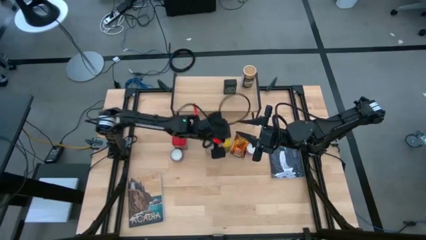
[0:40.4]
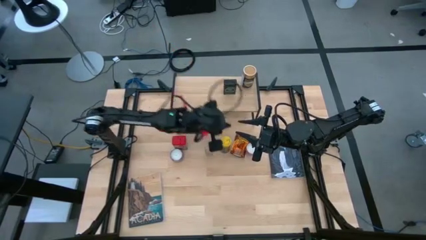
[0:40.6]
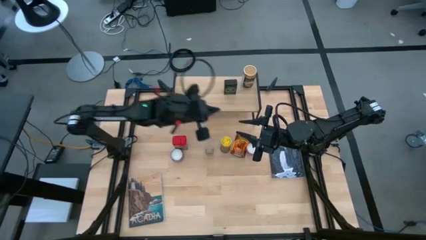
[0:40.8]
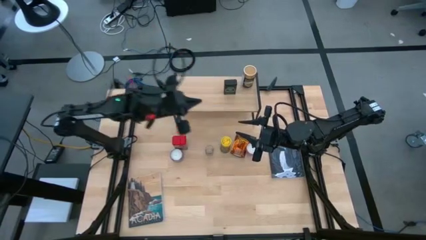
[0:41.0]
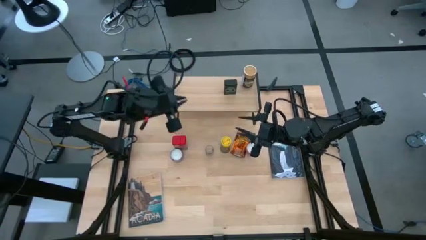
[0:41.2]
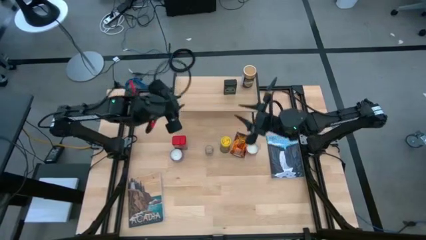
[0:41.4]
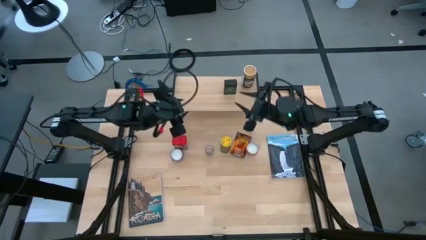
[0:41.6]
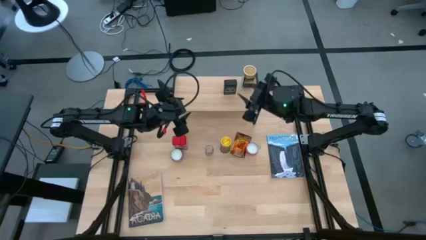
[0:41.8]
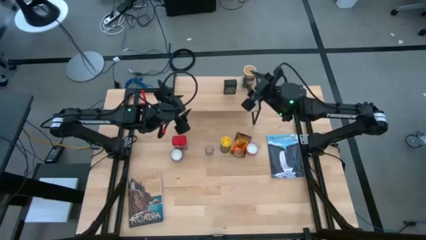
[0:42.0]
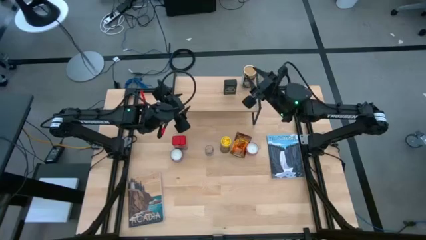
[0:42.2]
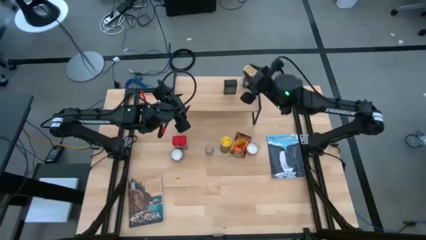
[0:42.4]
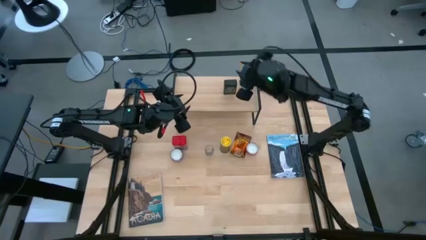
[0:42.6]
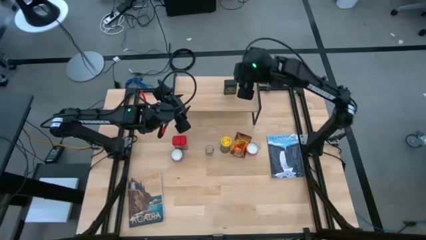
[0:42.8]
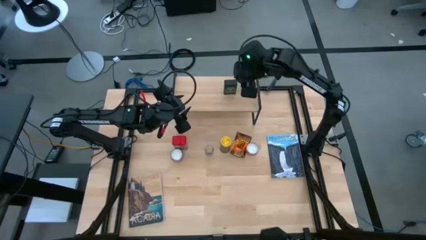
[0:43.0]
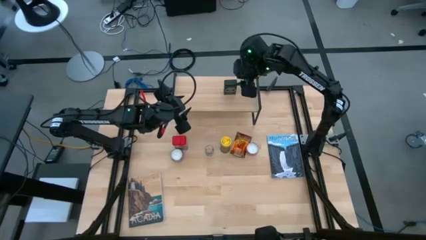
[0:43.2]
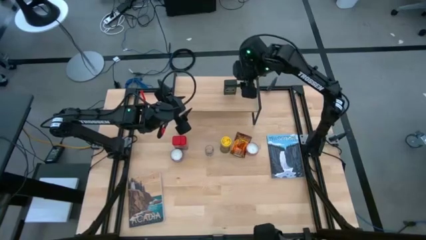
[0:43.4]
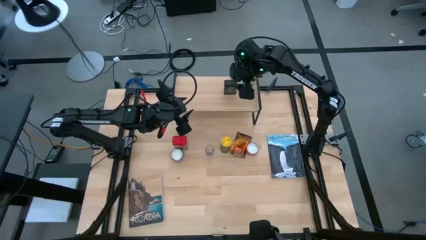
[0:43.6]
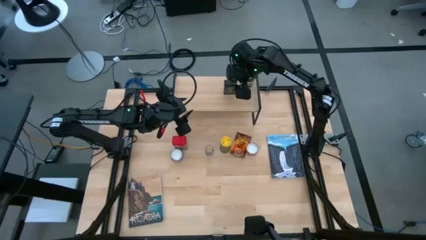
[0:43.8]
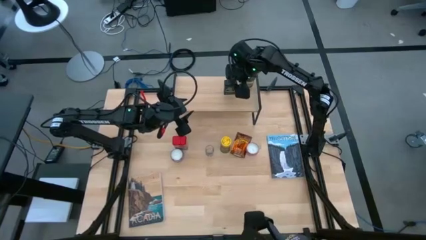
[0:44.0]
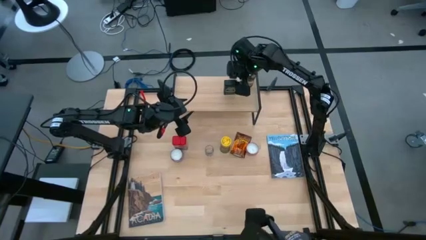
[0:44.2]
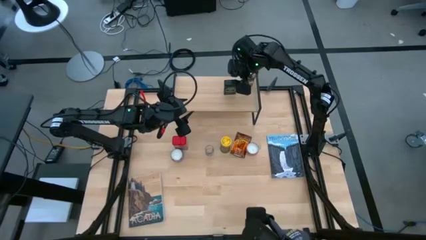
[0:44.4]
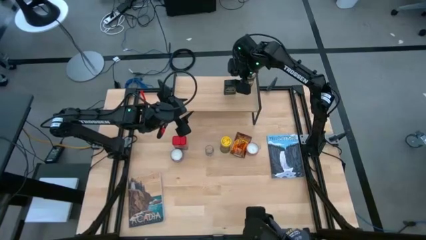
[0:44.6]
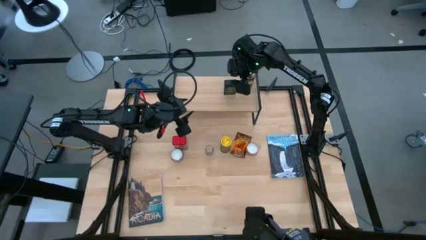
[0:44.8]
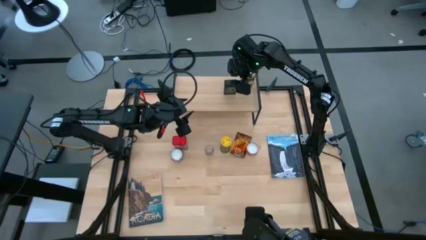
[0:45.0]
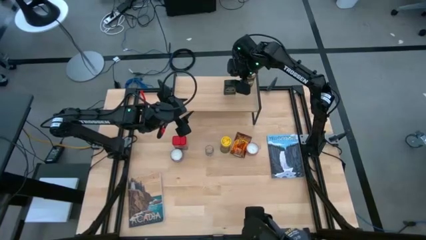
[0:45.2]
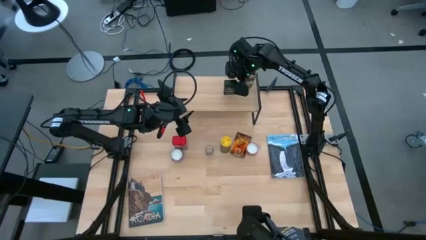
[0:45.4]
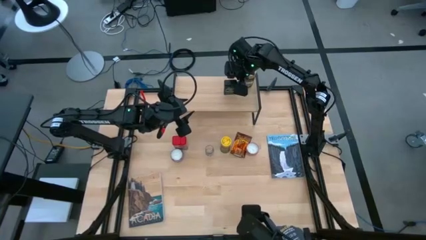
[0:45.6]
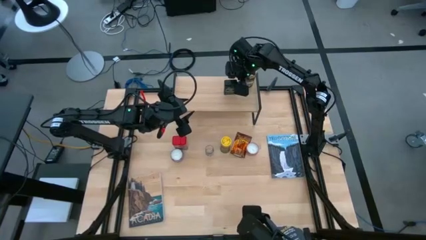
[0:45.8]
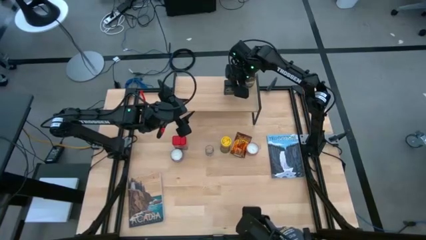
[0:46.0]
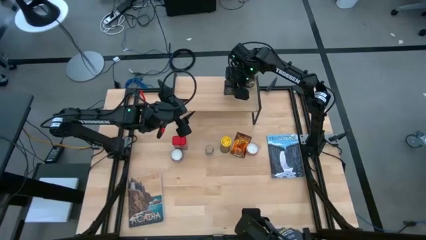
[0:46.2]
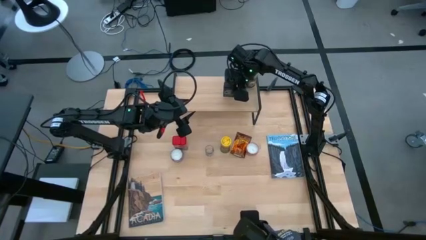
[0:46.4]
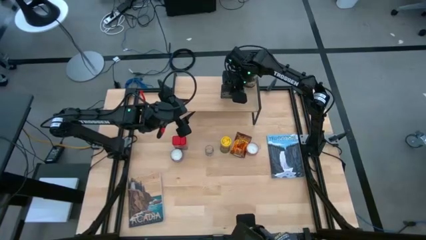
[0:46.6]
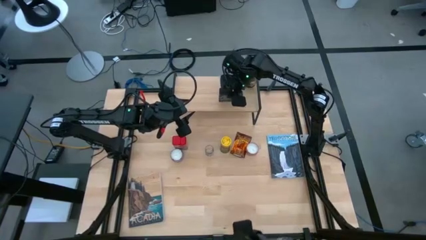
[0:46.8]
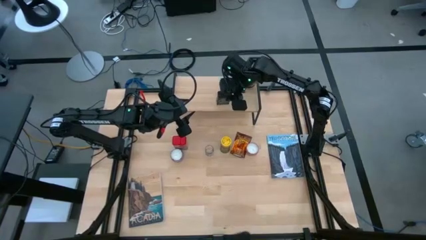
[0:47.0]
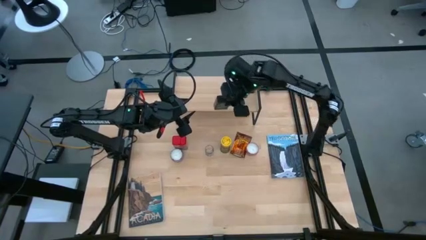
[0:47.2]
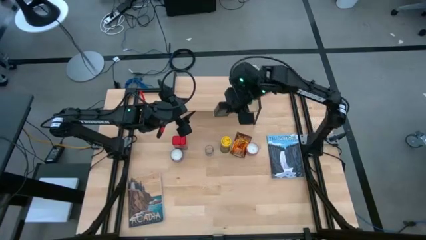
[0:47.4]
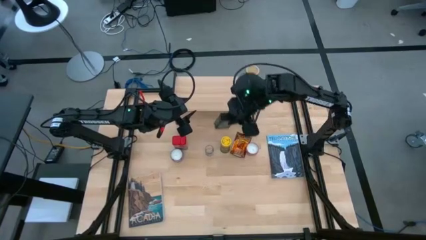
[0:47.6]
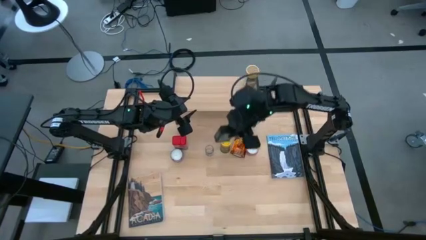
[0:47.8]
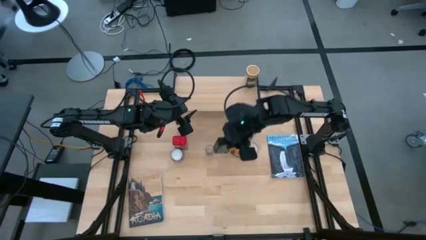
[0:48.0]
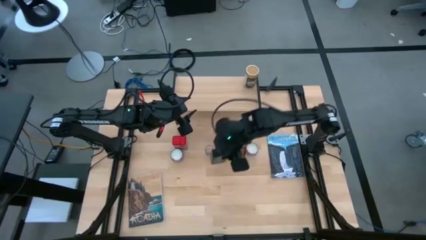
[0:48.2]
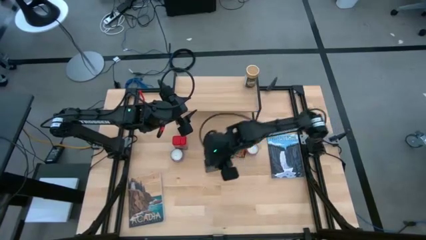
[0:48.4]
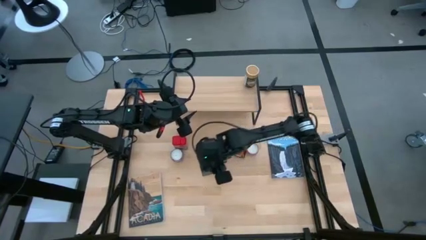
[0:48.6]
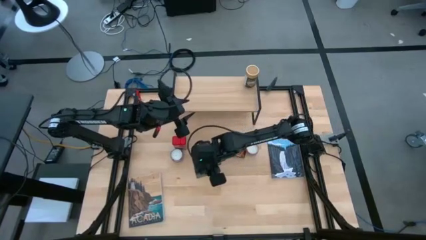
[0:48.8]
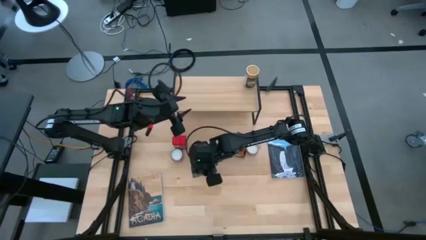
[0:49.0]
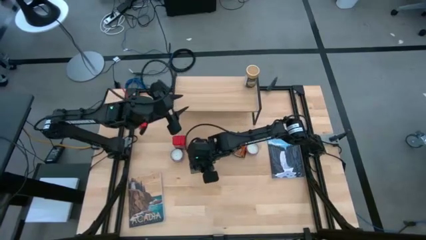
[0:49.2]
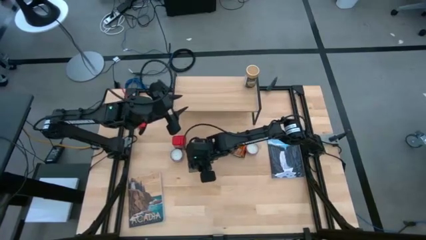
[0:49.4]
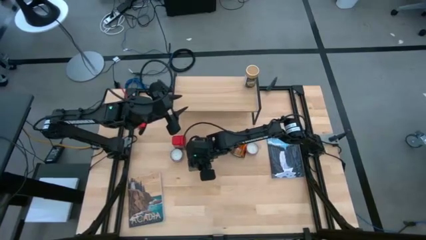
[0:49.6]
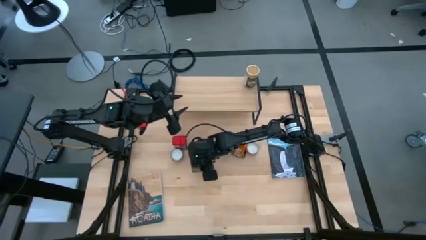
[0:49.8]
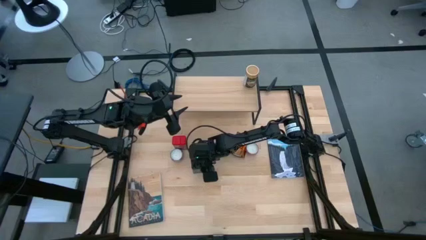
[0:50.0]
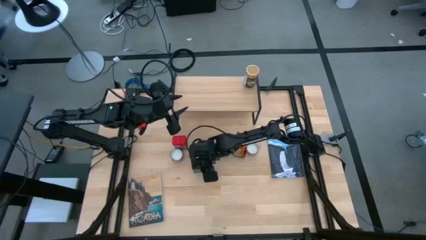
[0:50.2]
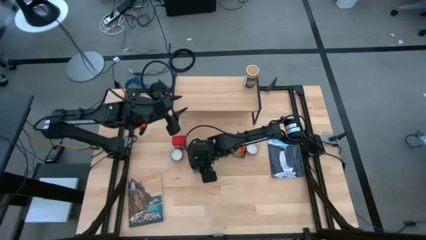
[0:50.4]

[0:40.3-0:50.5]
Task: Shelf spices
Remove the black seasoning can from the shelf

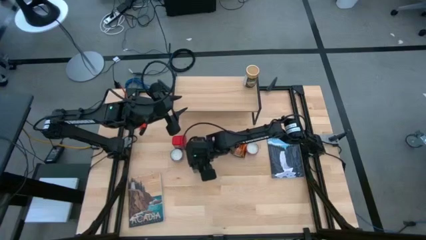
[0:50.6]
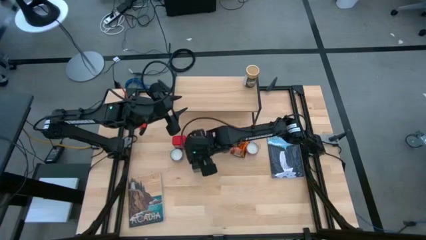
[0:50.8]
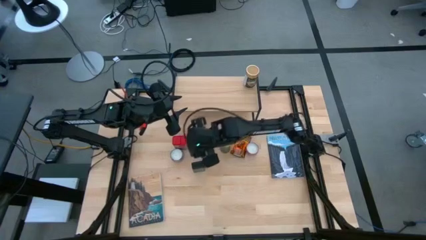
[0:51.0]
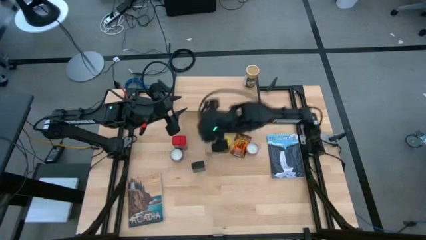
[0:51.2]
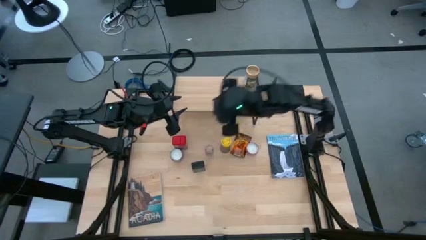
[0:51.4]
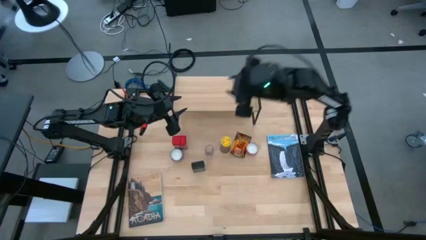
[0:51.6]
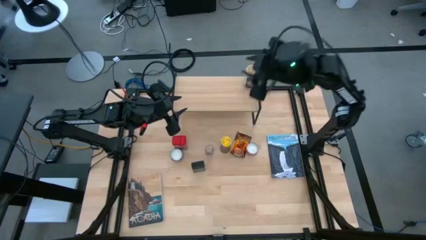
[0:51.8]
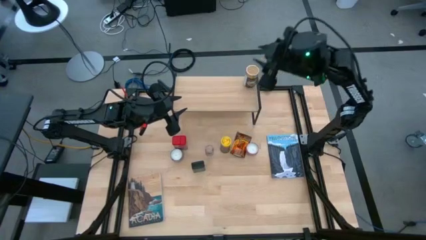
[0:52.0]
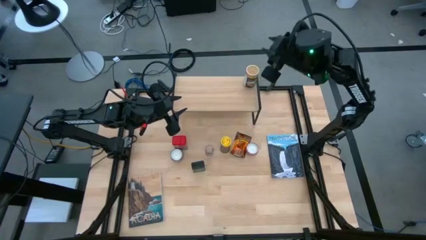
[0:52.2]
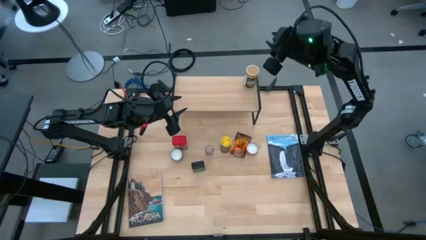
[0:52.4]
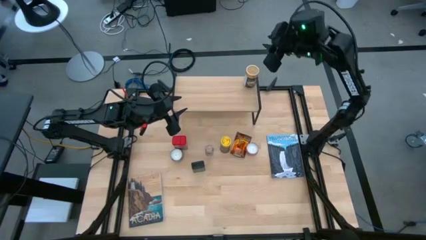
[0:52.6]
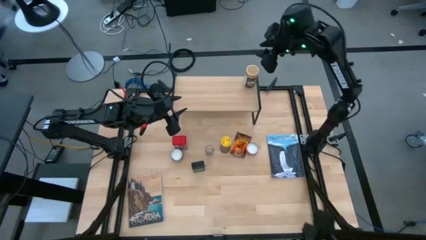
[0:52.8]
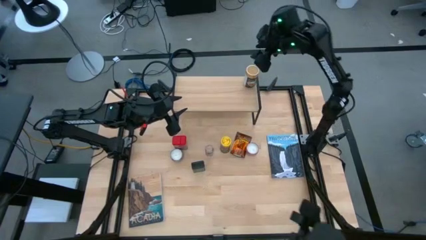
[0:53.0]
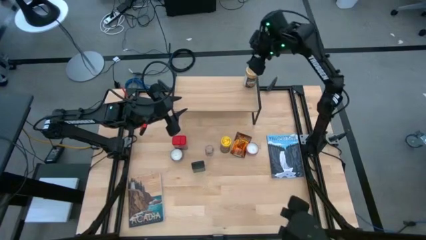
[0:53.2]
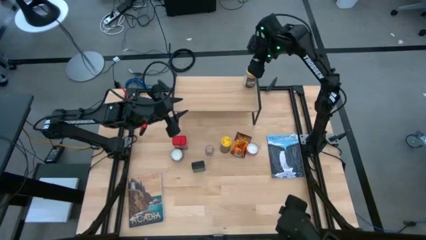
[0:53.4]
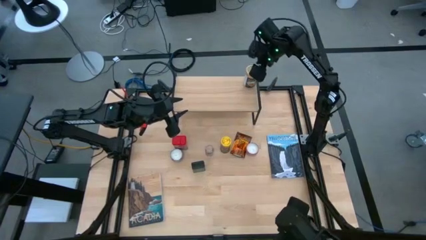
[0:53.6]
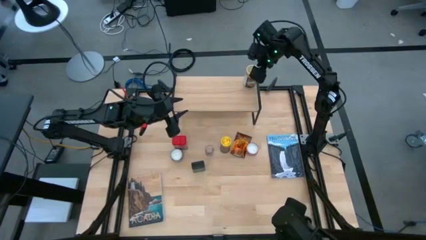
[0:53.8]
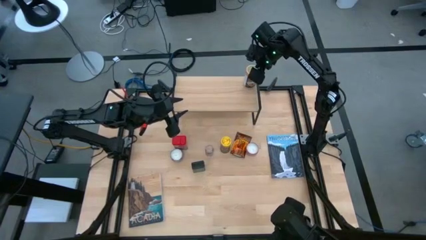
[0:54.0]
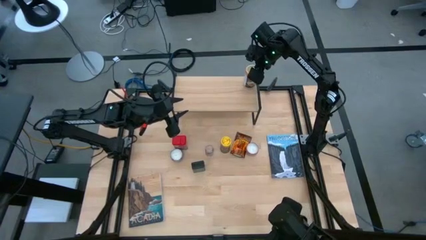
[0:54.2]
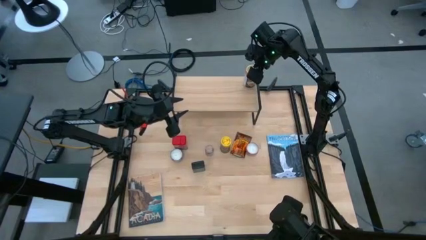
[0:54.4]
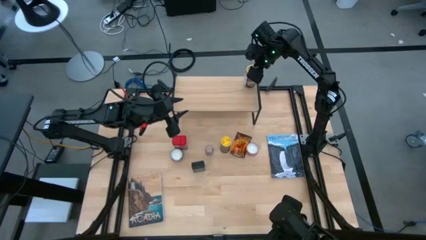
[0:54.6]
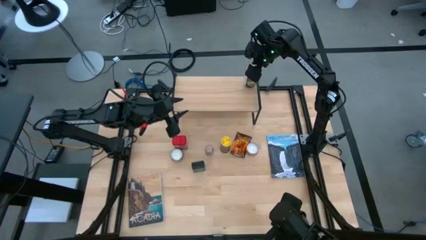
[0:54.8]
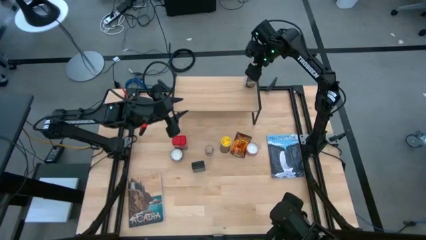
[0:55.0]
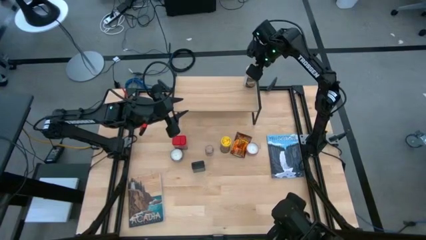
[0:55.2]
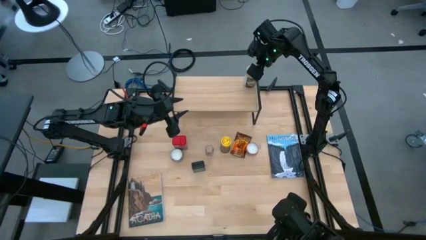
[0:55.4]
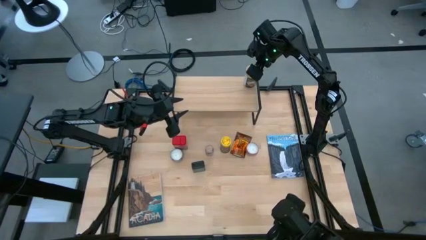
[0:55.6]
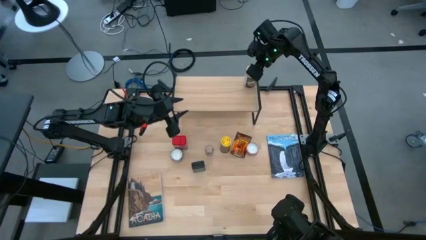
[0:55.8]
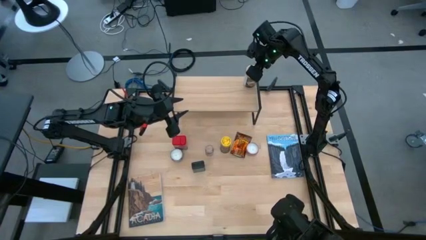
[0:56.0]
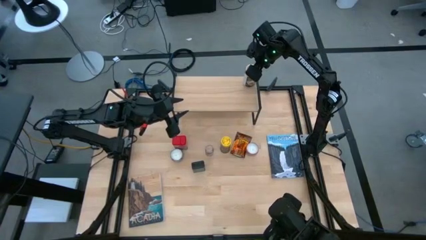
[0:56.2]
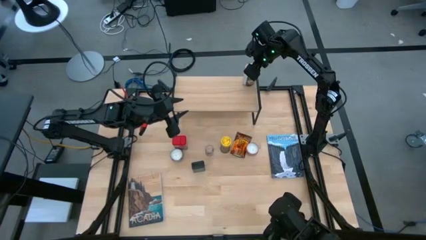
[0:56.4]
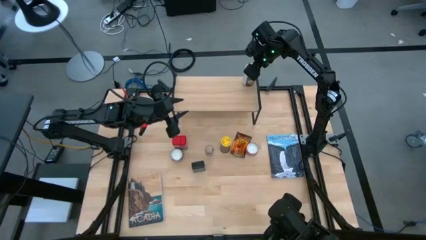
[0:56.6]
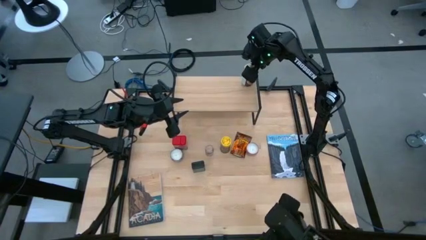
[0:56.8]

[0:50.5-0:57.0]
Remove the gold seasoning bottle from the shelf

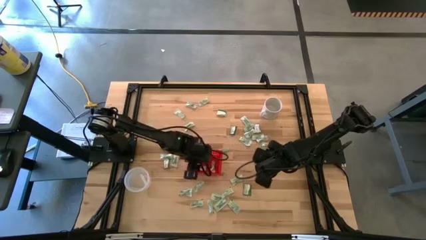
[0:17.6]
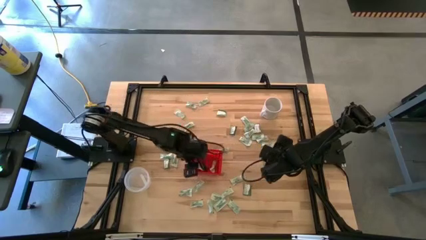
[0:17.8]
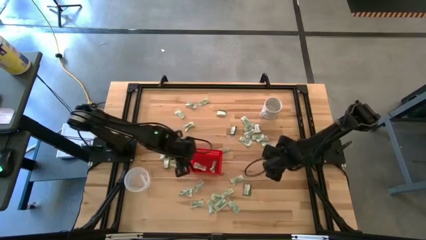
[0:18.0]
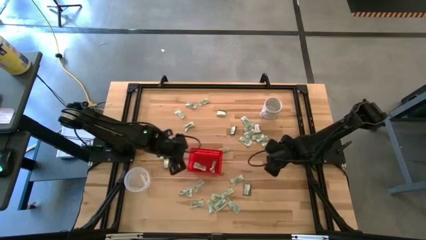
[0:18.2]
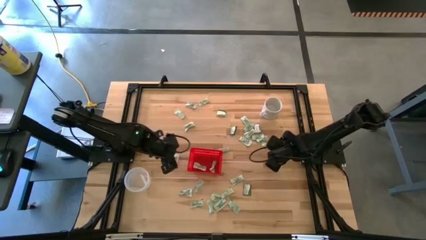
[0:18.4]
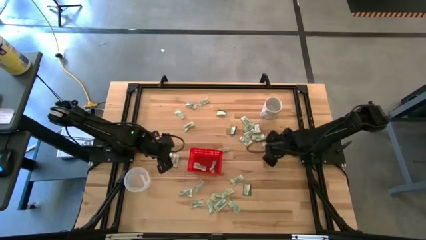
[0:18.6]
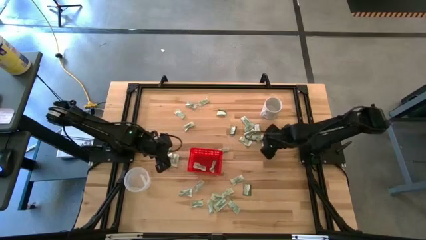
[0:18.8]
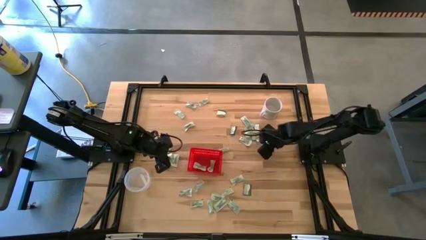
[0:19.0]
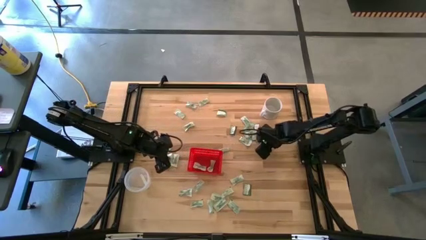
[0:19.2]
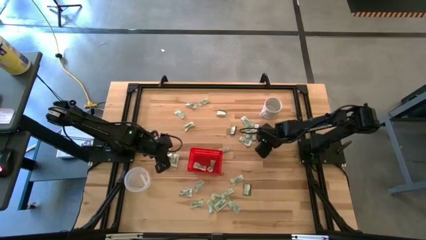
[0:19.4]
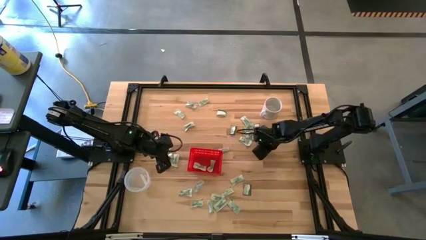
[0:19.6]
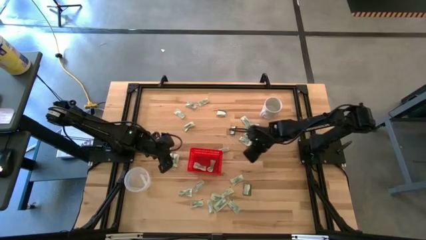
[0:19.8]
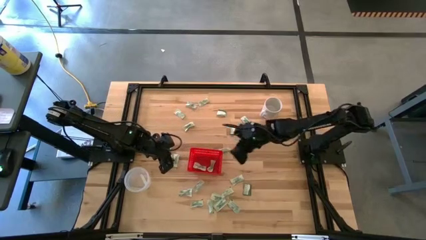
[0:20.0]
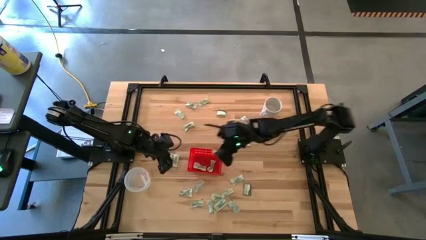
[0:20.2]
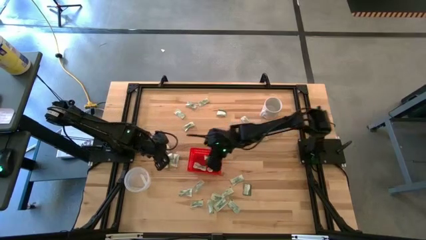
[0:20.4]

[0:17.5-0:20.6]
Task: Pick and place Stevia / Truvia into bins
Put the green stevia packet into the red basket
